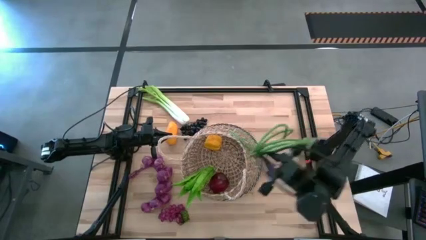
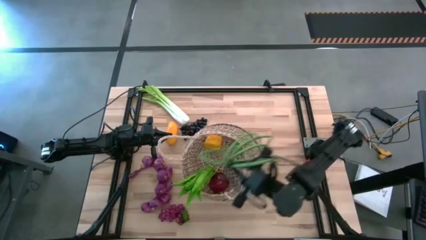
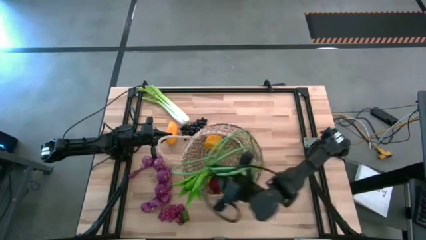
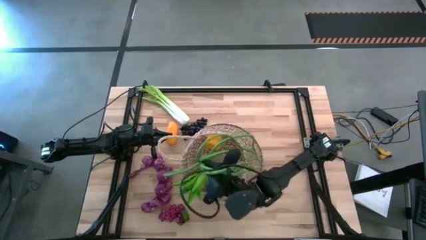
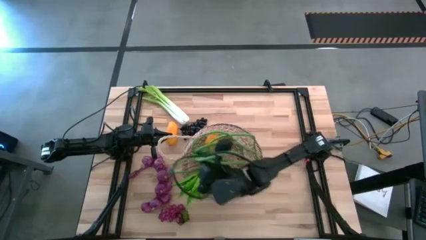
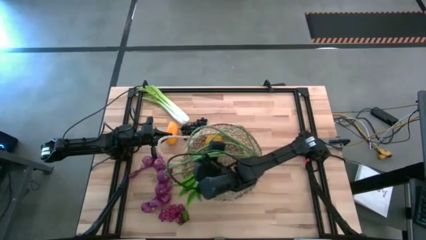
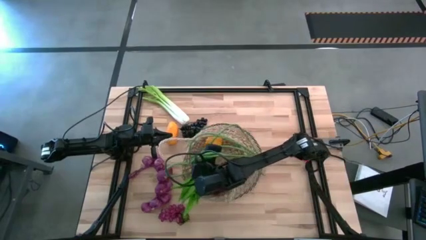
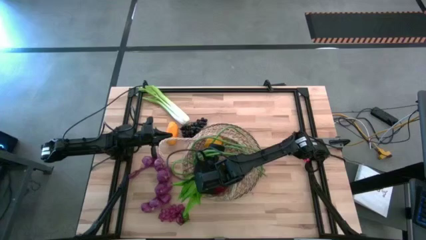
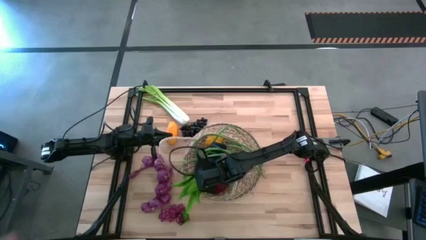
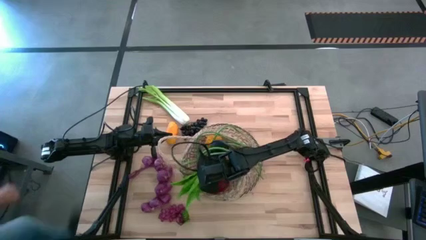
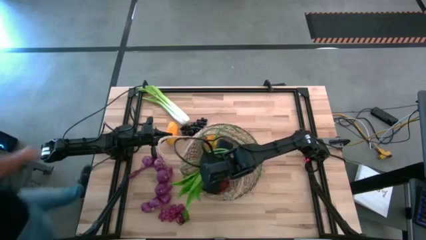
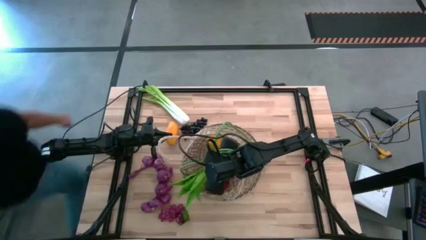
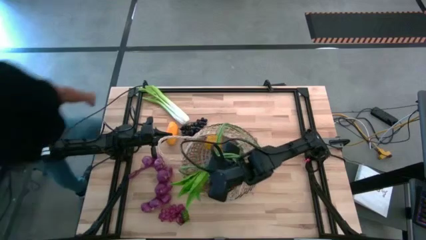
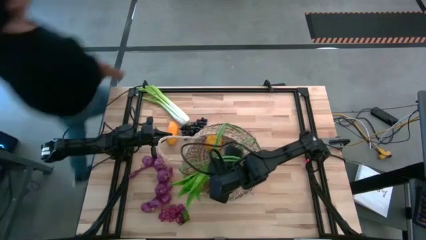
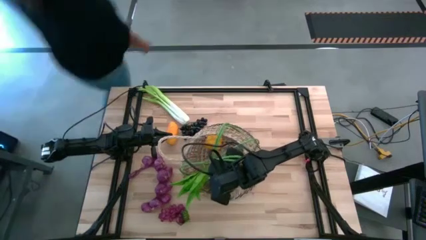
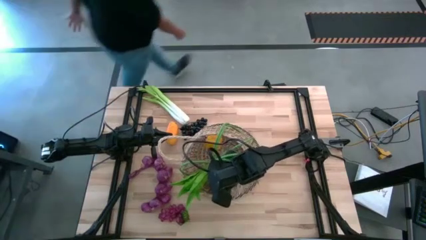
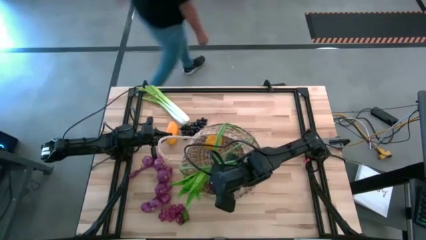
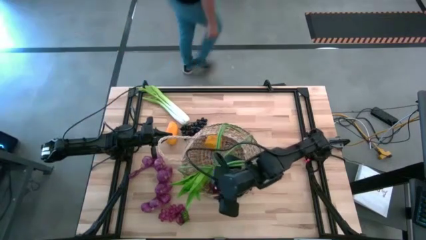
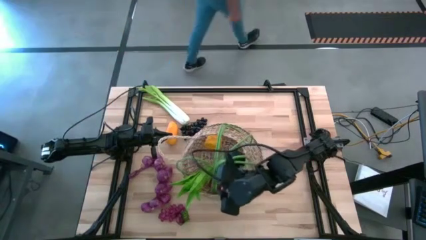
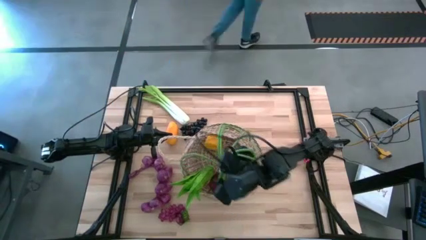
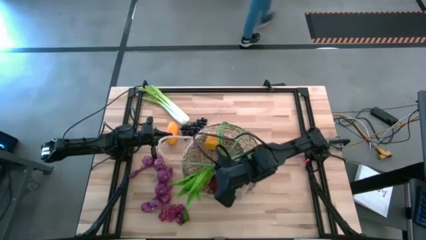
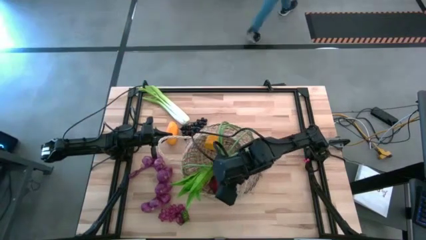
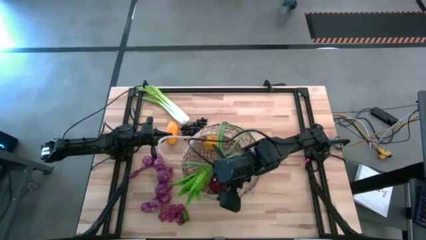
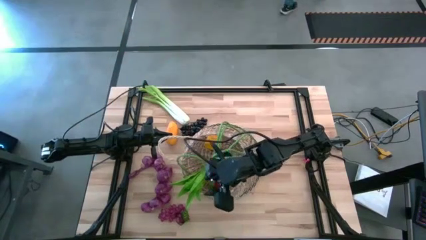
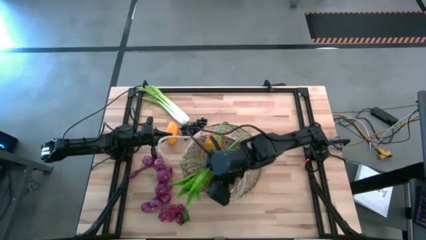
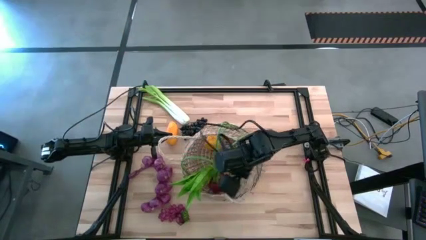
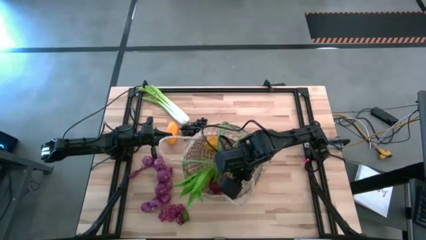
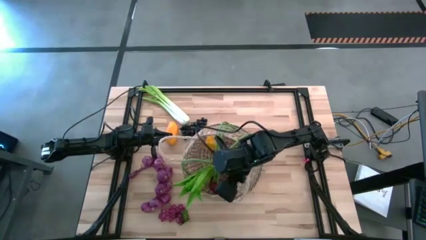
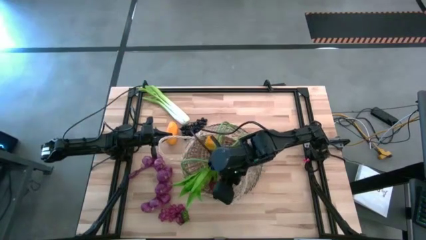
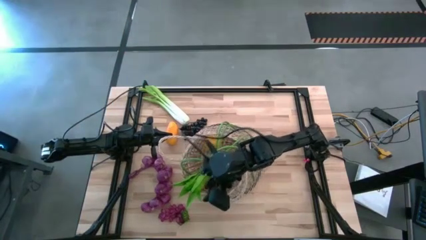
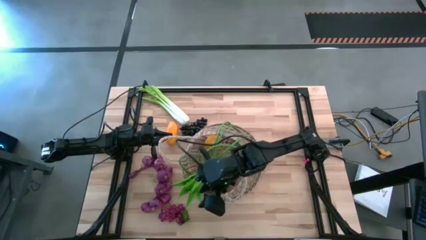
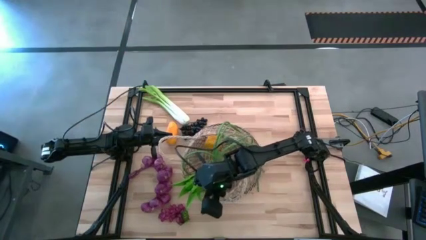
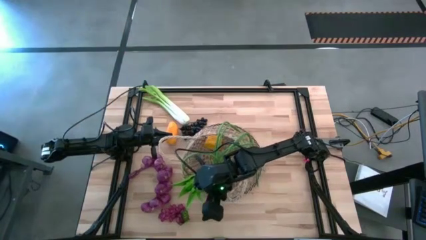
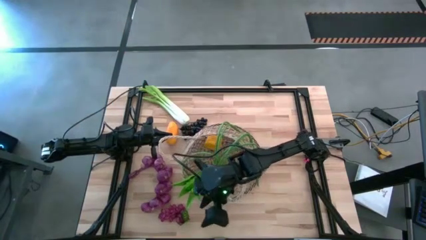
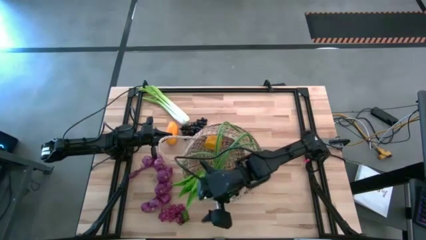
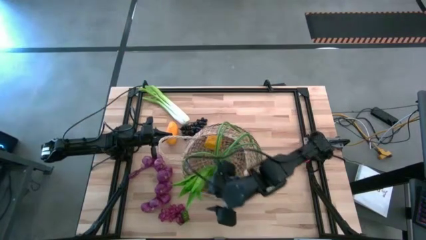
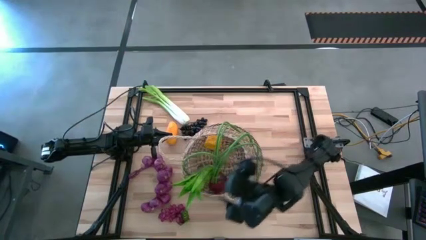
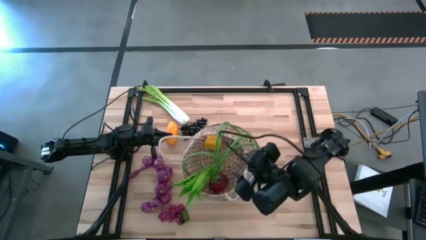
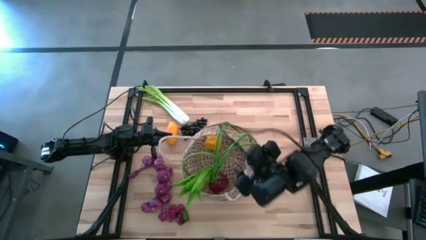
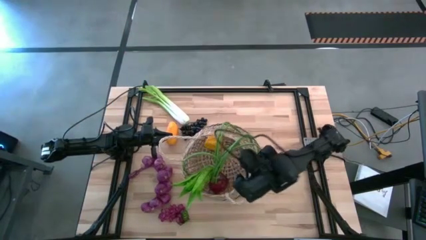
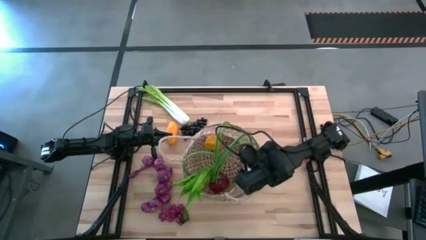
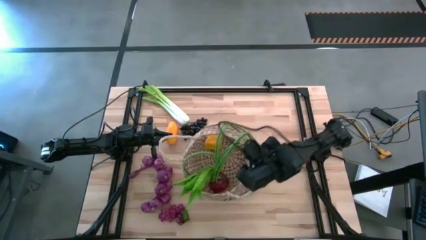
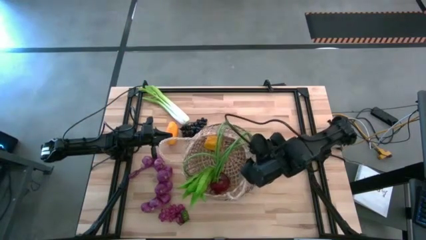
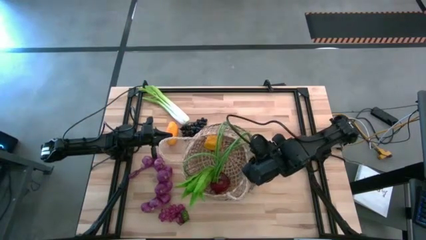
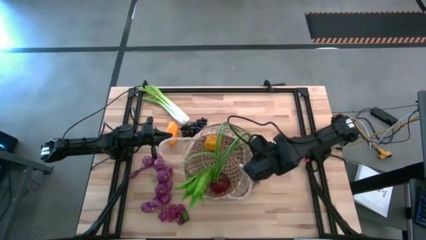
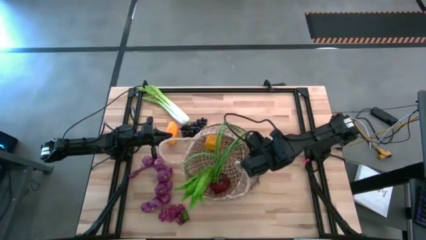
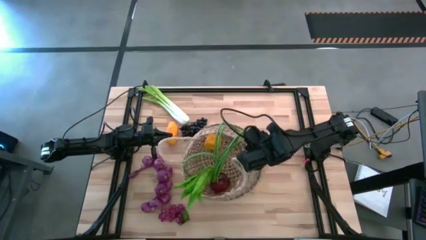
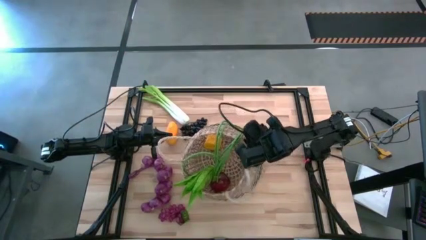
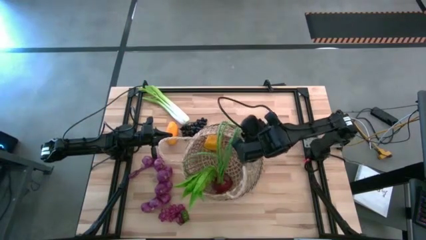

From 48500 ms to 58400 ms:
Task: Build produce basket
Put the string beans into the basket

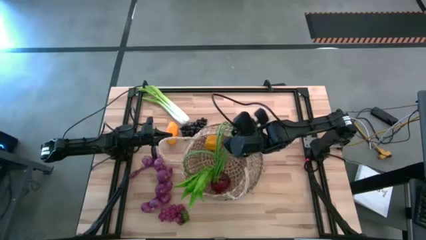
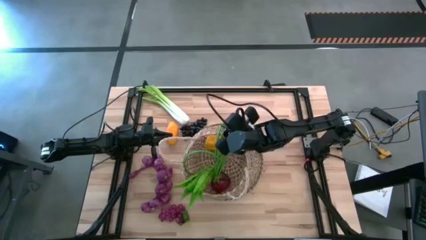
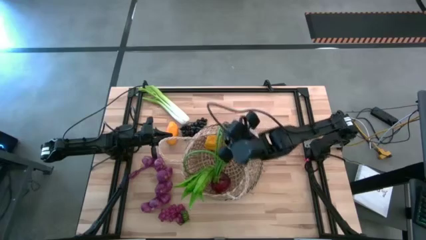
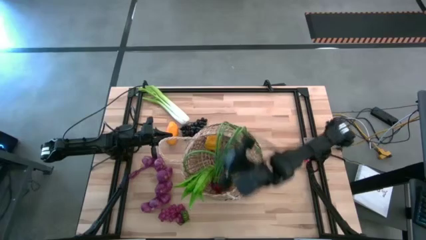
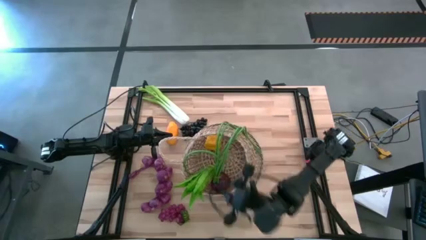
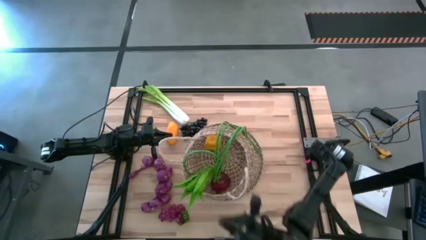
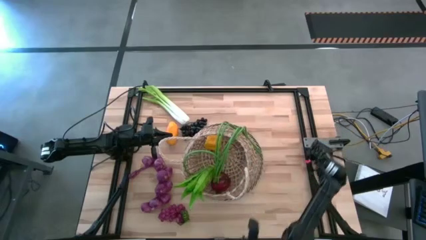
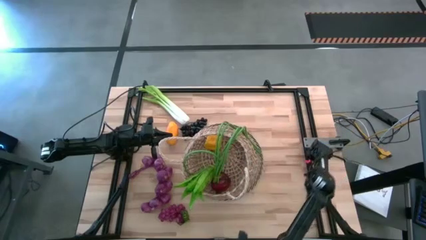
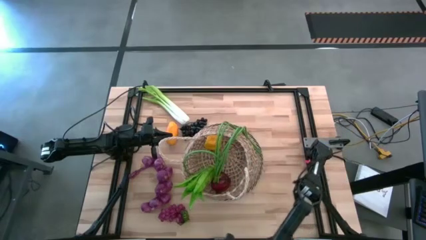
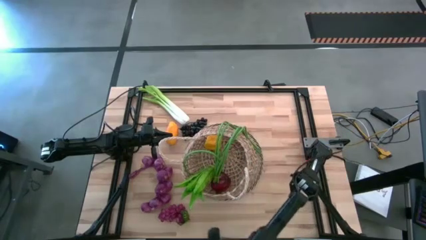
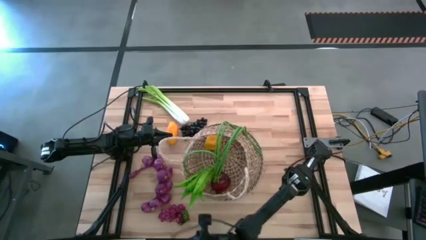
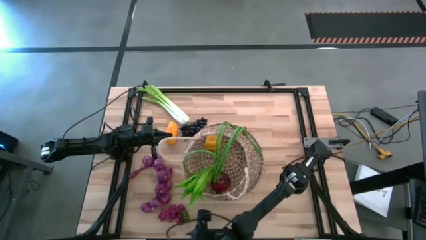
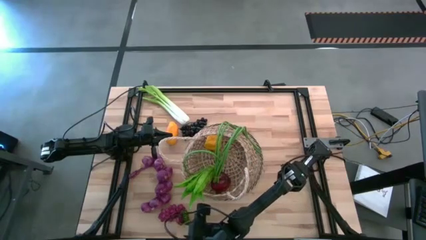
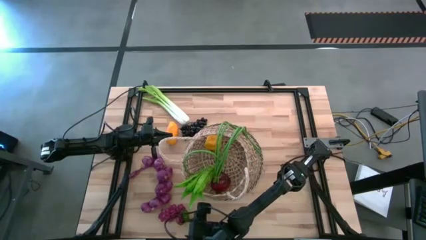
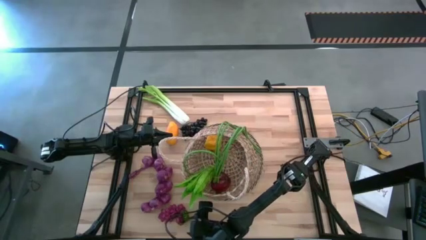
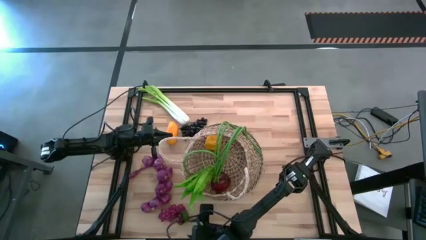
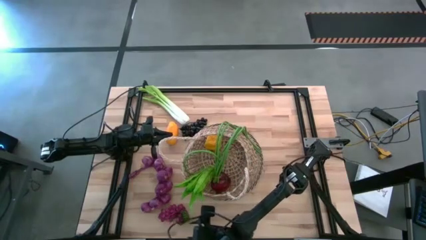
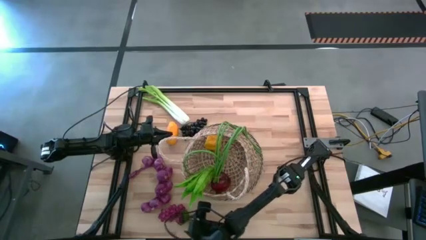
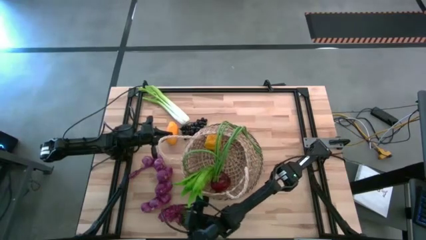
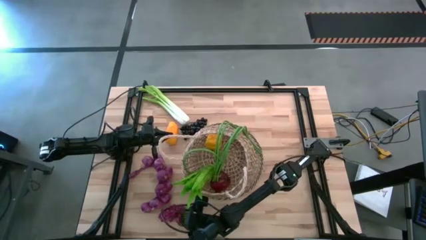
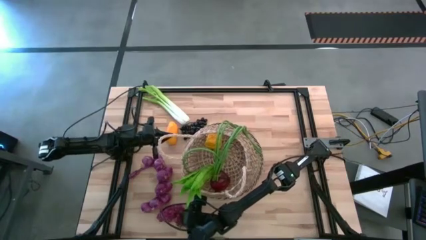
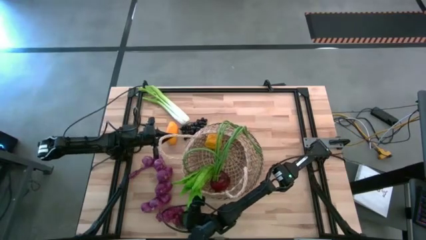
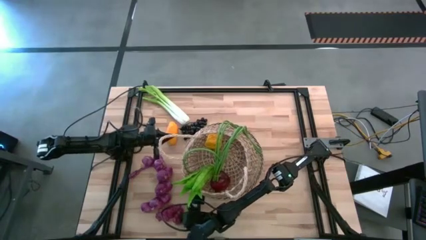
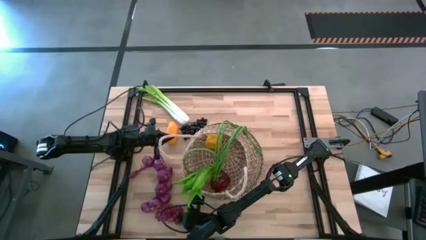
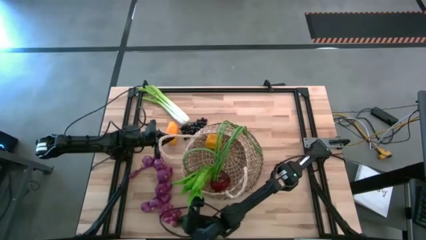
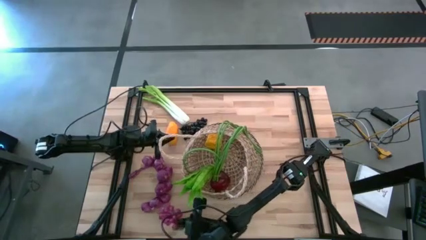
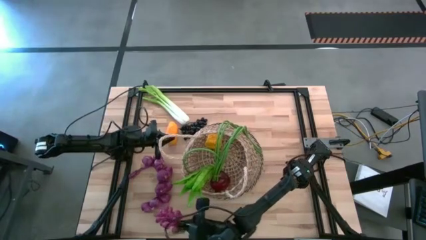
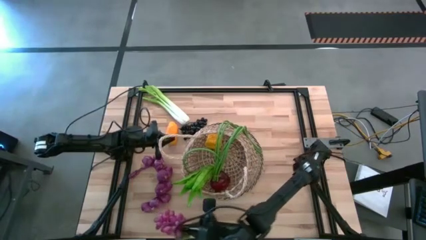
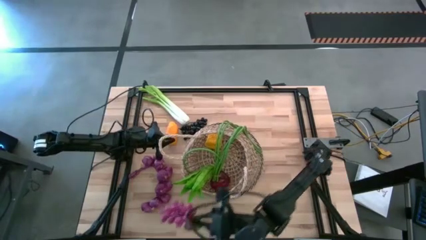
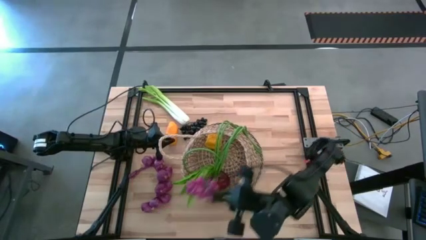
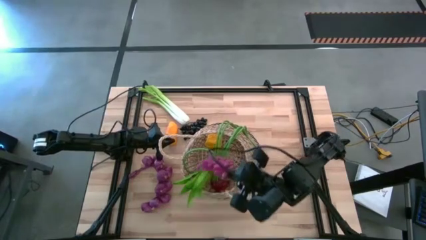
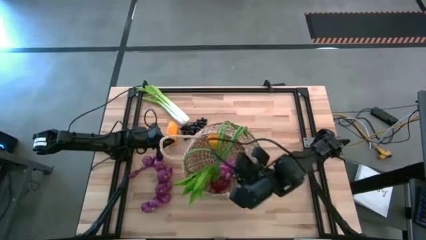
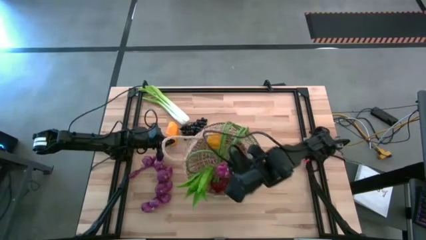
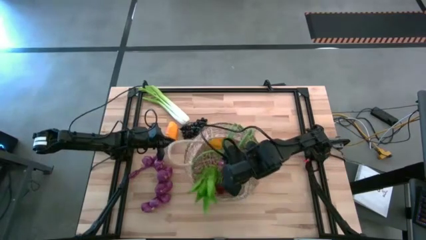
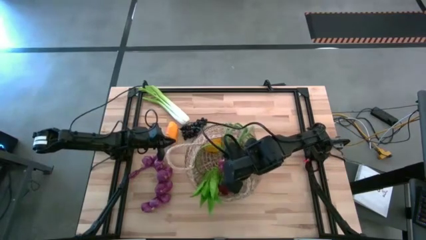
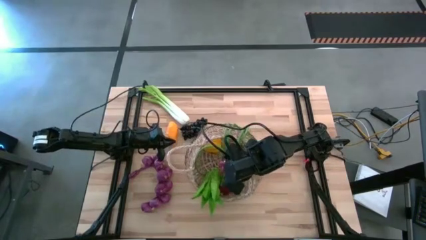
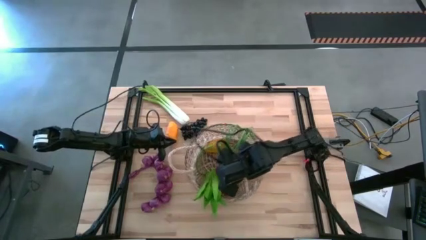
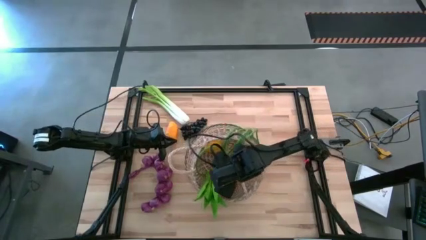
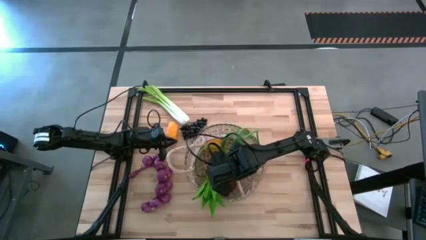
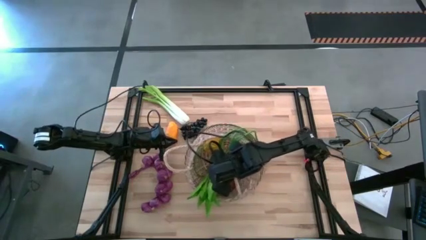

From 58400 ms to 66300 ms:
Put the grapes into the basket
